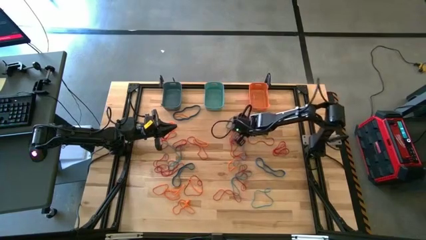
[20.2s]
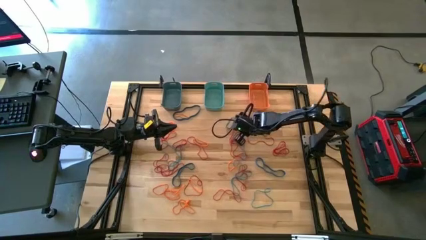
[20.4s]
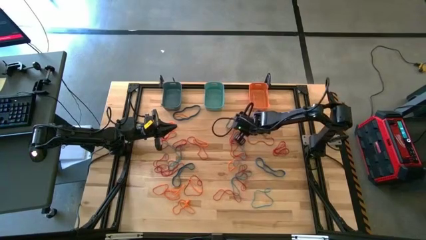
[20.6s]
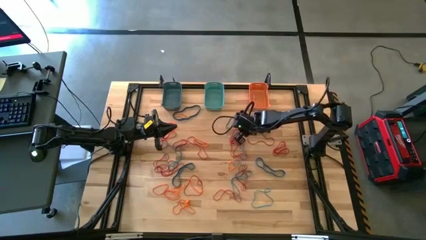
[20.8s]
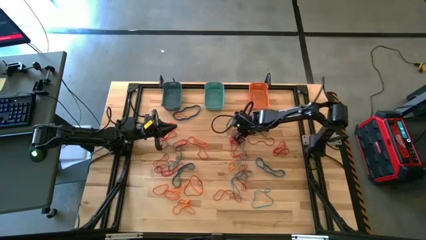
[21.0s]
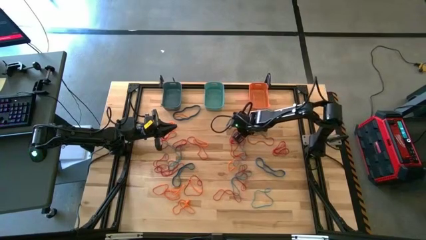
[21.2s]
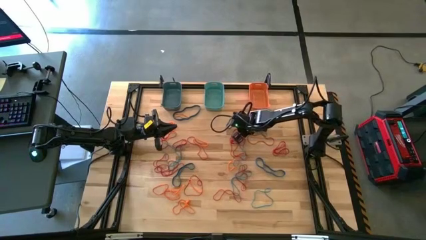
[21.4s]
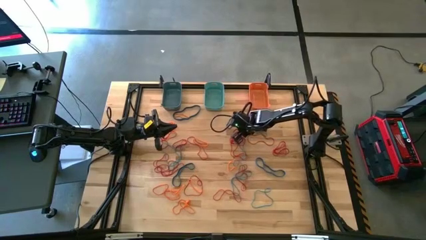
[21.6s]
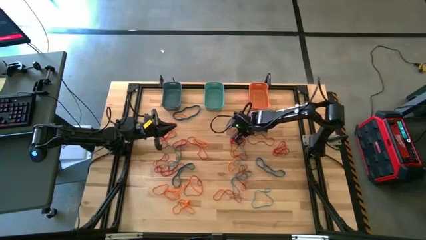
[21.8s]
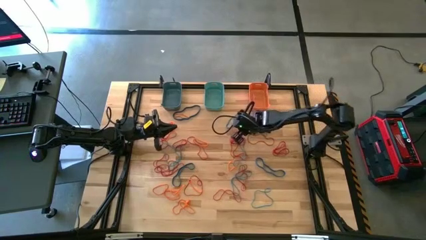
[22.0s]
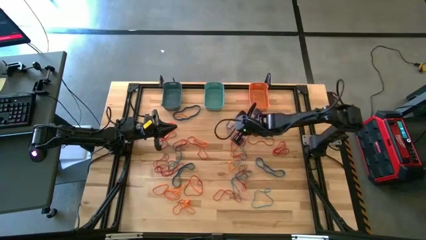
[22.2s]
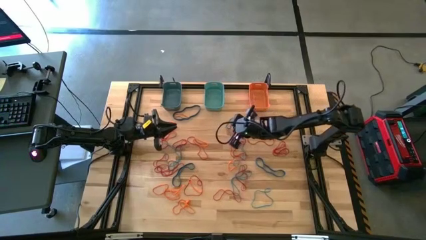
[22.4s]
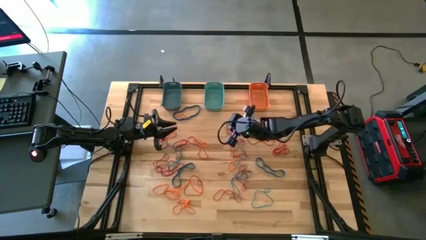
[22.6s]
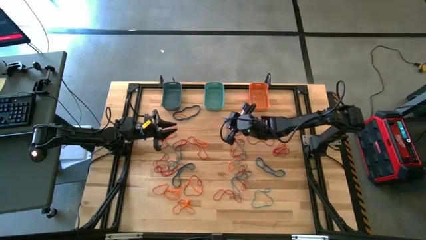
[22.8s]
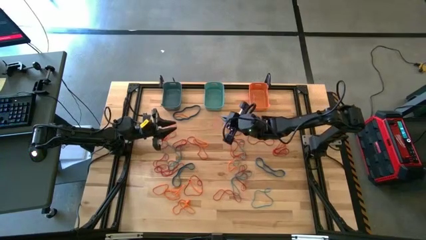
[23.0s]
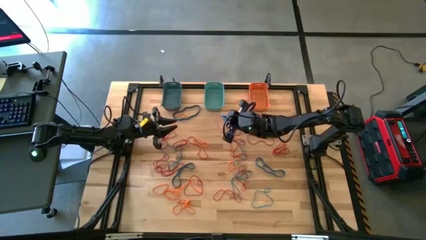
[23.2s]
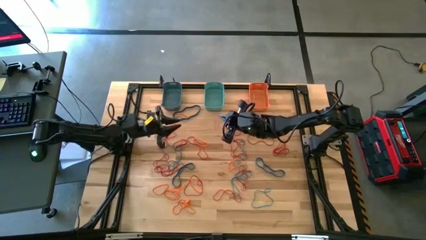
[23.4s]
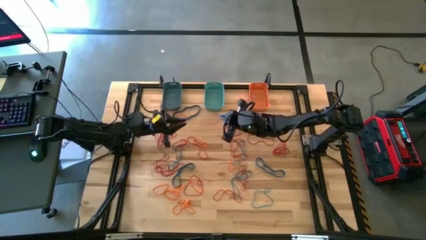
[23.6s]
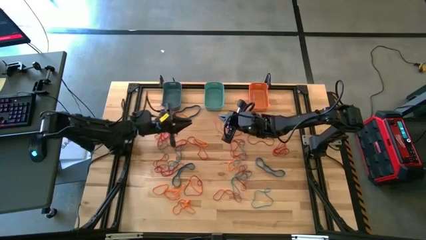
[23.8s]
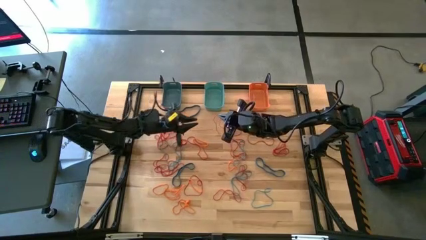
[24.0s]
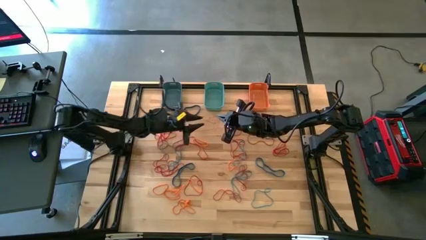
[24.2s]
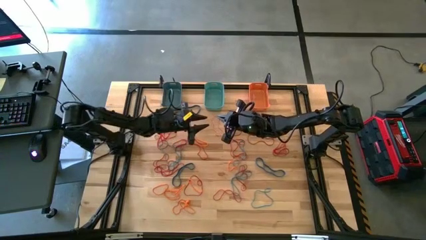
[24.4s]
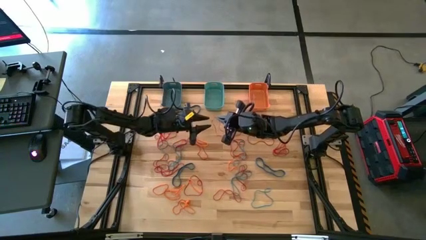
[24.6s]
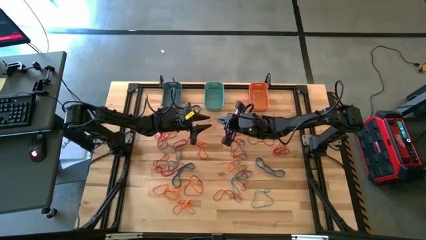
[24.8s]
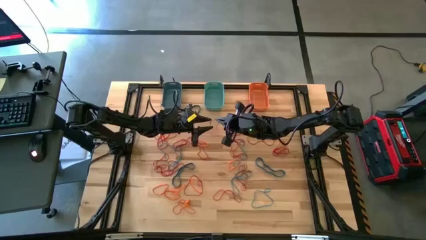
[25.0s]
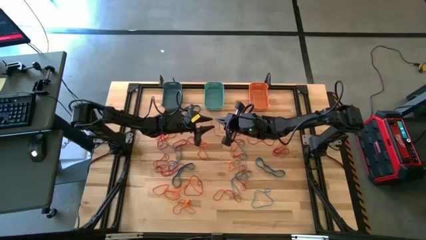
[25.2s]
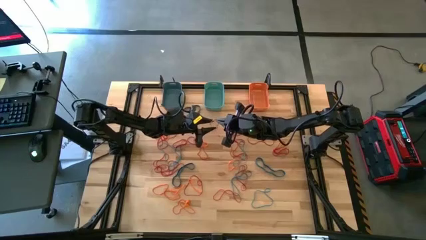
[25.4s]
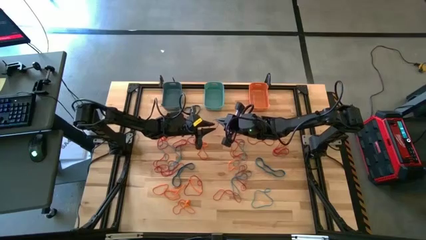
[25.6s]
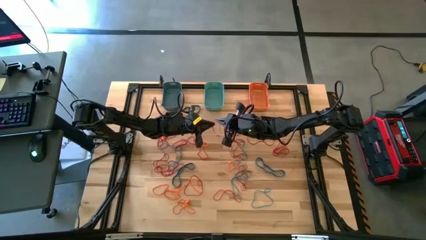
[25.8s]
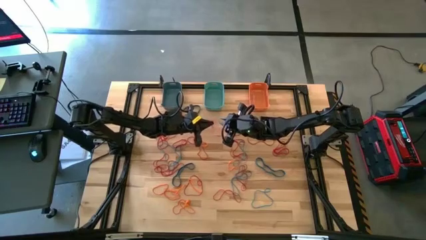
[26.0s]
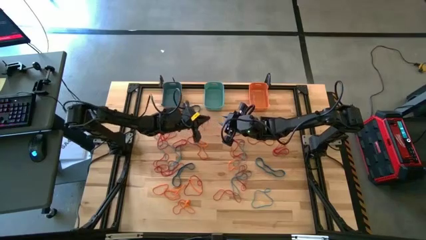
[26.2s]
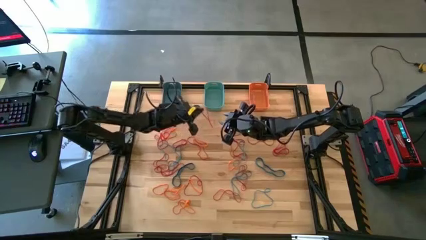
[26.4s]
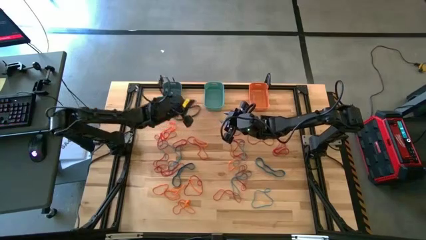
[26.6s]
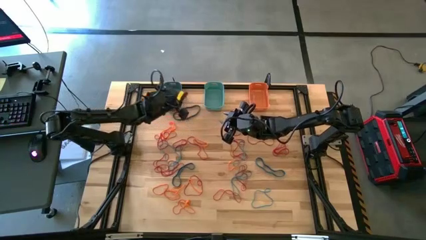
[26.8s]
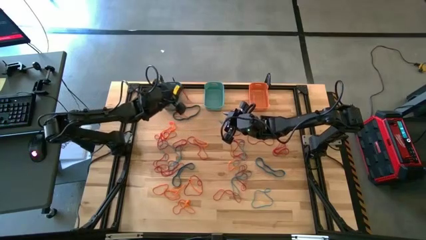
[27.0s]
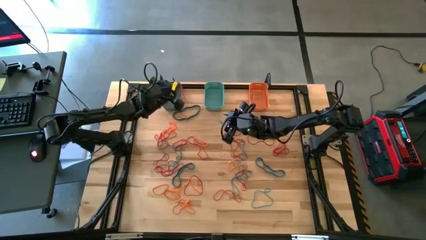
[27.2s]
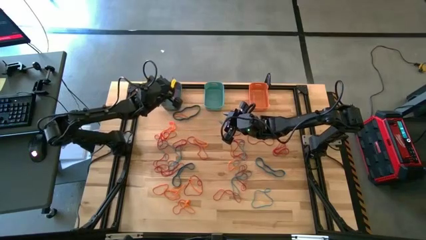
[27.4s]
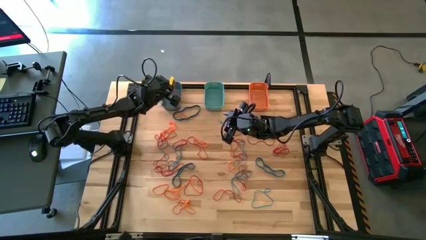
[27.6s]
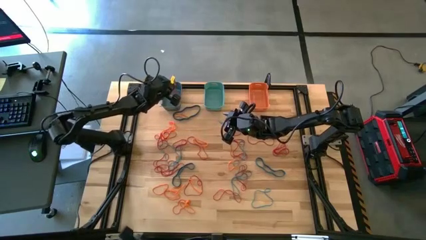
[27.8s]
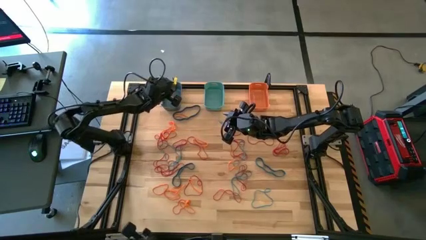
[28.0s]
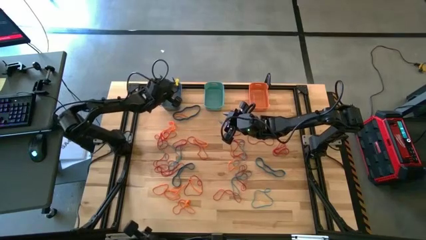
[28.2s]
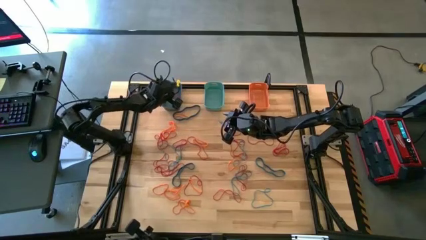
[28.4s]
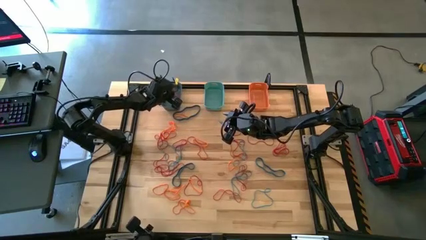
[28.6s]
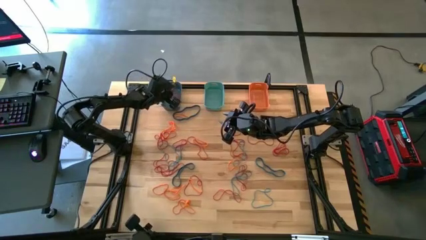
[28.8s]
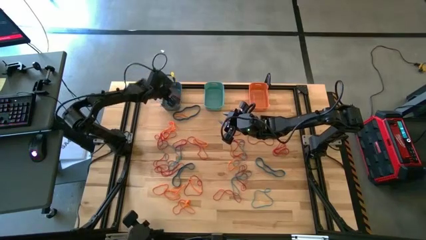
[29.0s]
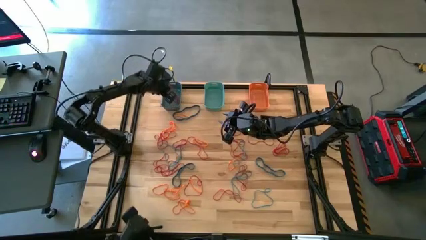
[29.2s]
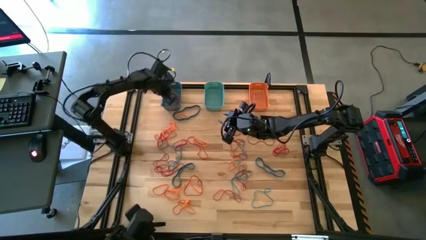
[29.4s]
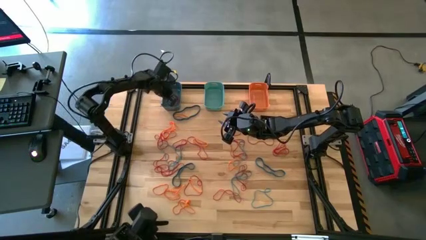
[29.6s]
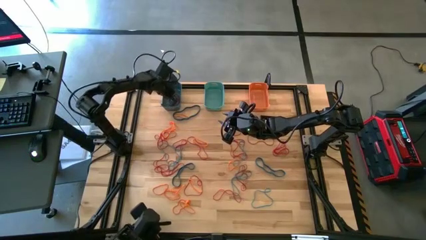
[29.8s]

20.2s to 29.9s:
Task: Sort rubber bands into baskets
Put the red rubber band into the blue bin

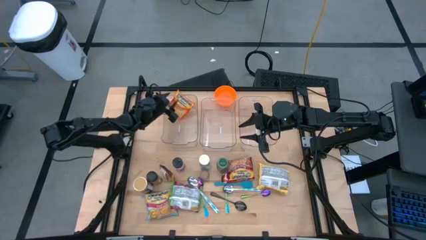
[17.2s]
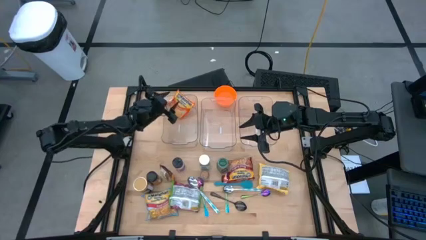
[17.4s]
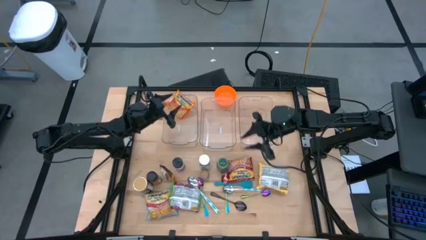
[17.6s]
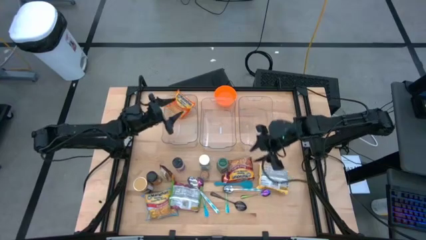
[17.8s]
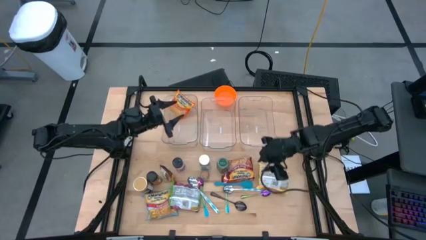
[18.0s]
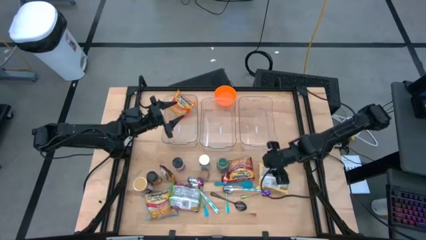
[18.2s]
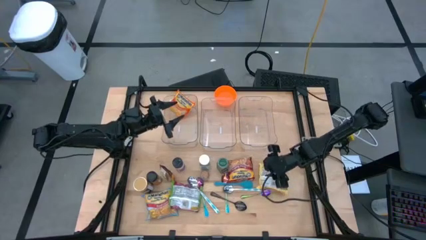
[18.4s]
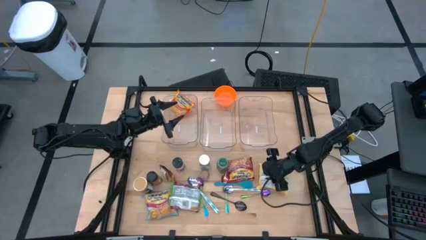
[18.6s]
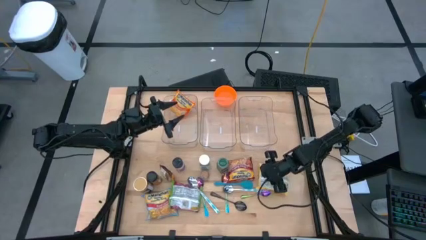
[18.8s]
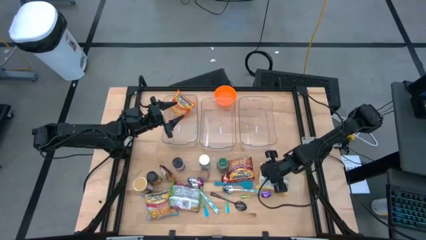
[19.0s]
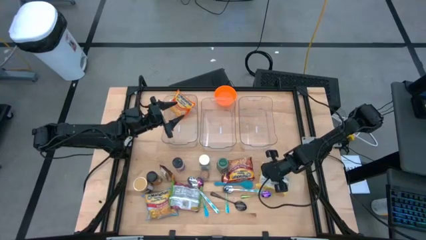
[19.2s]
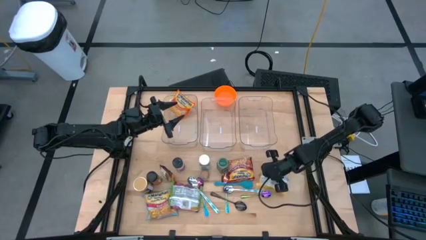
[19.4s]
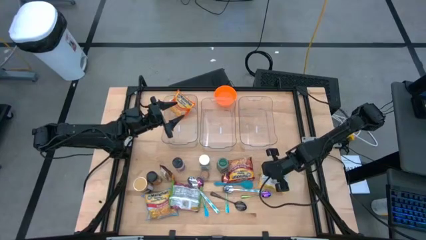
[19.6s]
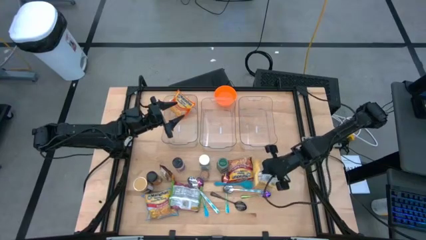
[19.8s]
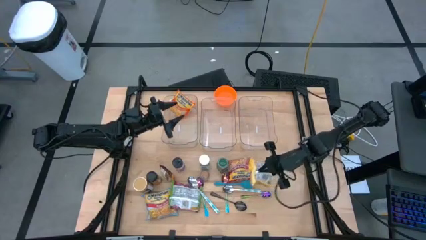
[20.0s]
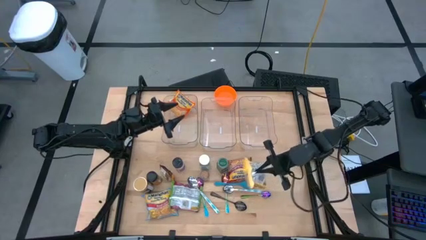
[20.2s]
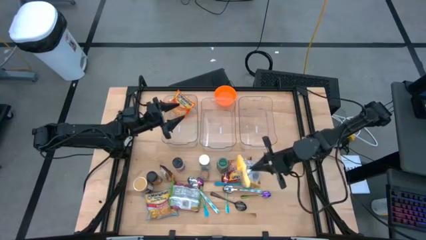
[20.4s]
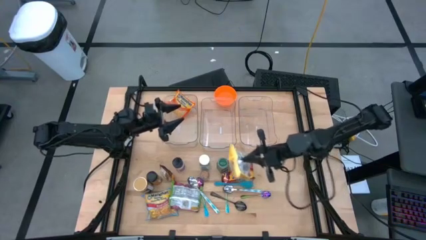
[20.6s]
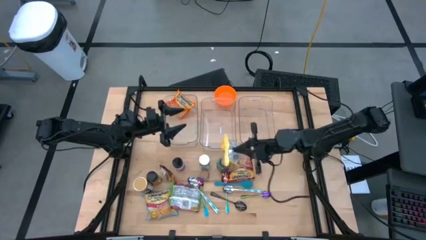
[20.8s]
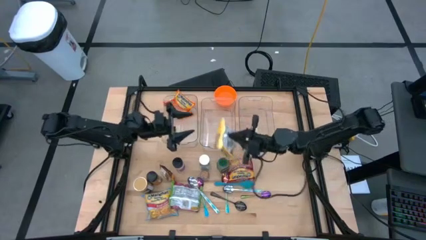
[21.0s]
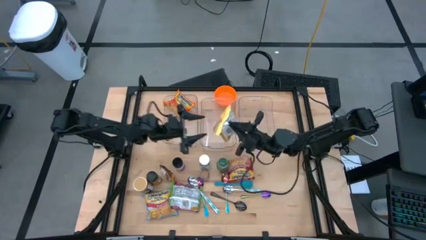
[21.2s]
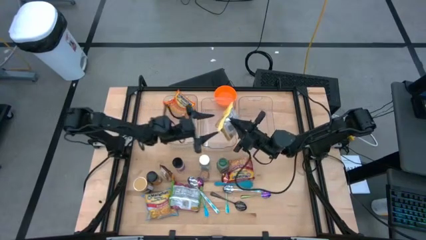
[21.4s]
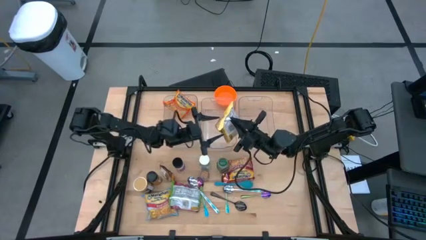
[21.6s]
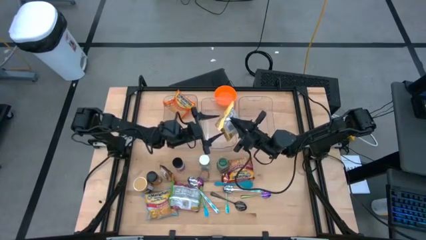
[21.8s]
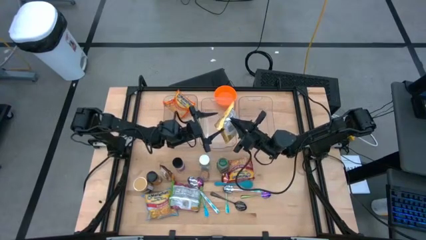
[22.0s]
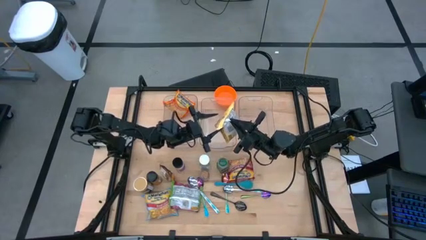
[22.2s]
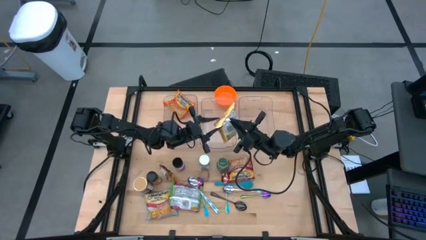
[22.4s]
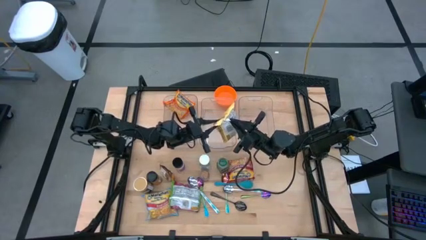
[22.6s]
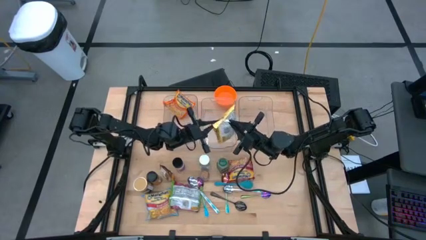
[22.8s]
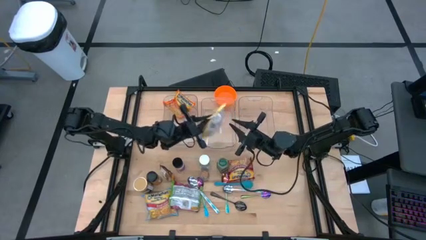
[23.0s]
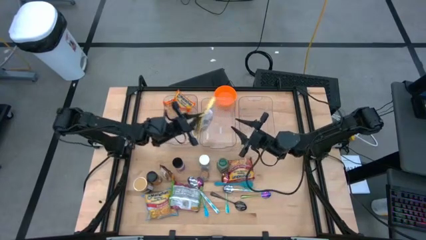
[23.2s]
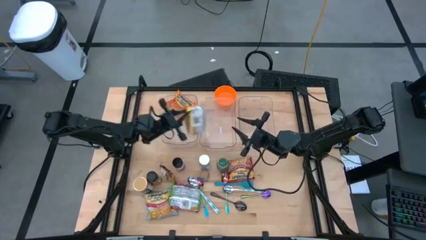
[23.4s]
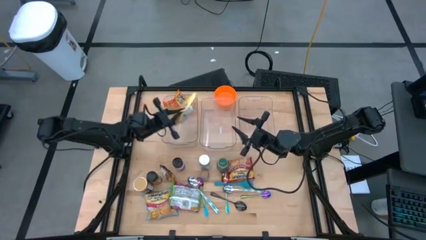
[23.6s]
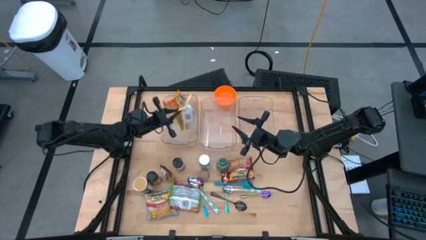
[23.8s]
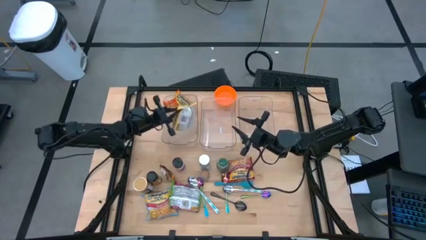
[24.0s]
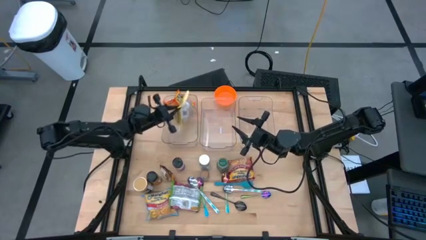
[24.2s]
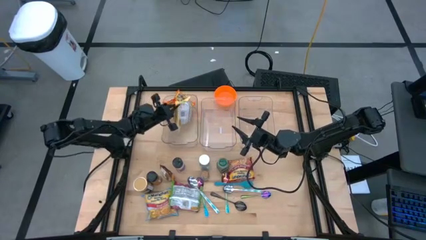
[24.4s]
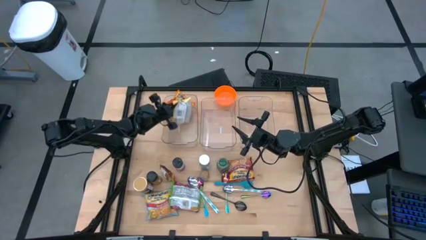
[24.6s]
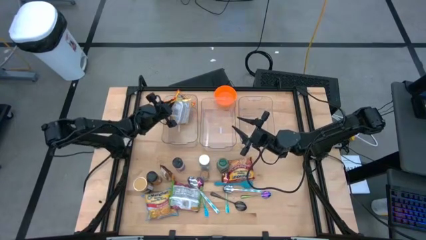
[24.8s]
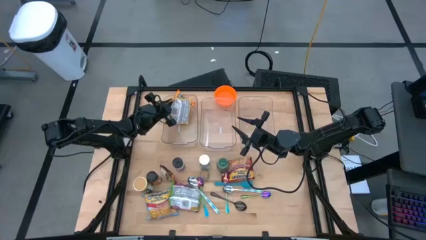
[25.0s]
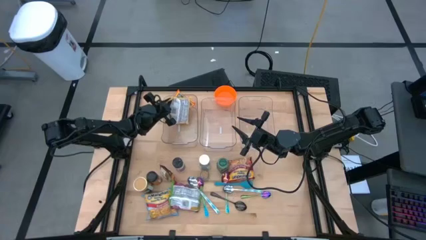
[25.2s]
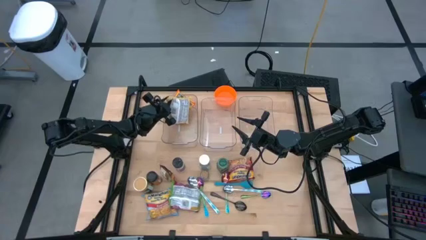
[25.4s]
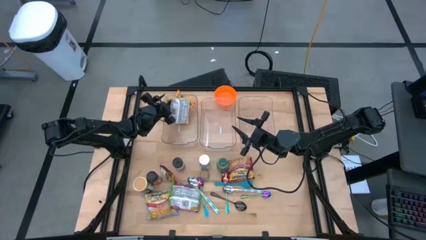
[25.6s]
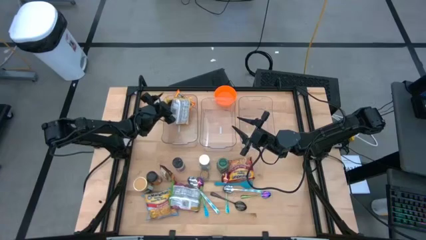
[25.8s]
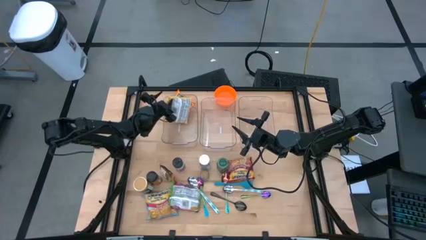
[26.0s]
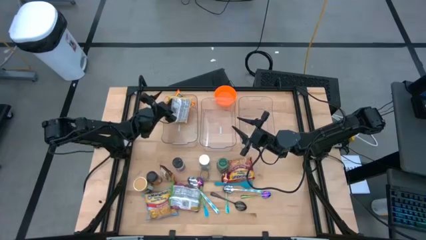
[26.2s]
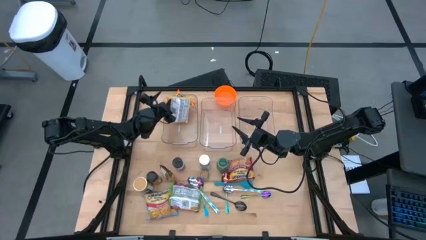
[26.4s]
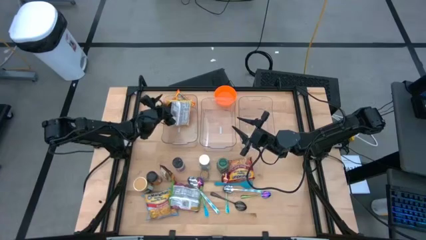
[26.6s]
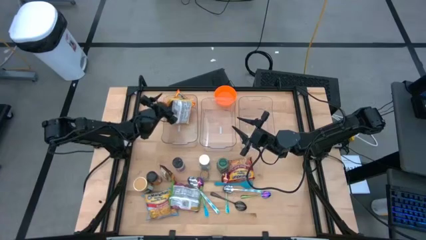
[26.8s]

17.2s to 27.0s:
Task: Pick & Place Food Item
Put the yellow noodle pack into the left transparent bin
